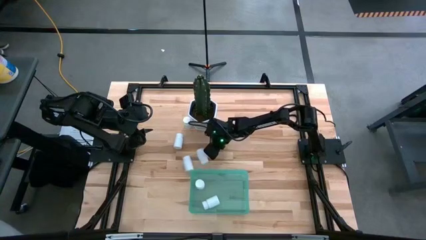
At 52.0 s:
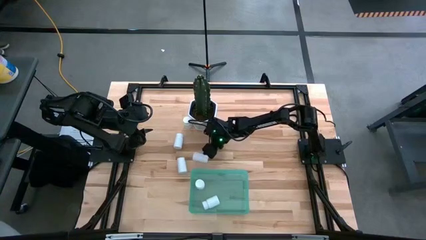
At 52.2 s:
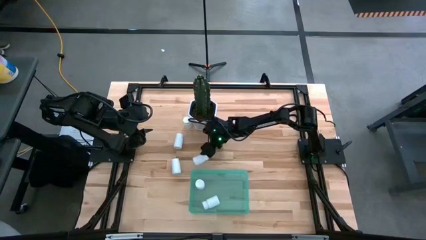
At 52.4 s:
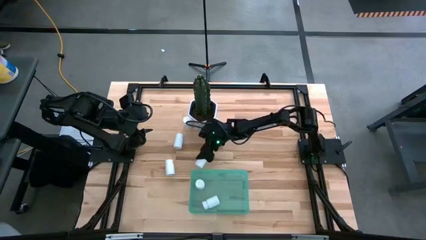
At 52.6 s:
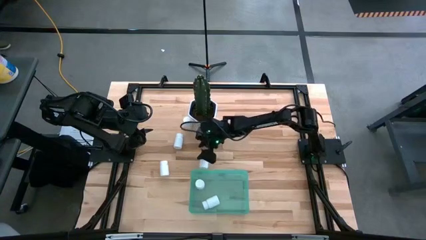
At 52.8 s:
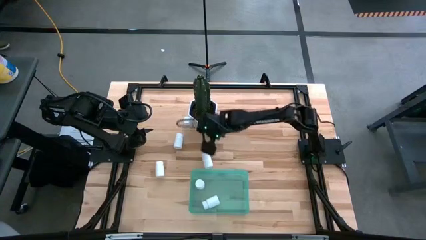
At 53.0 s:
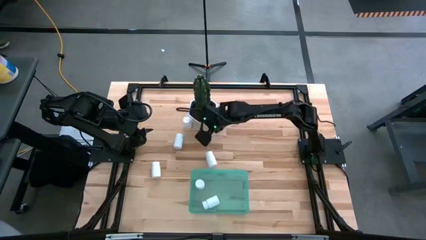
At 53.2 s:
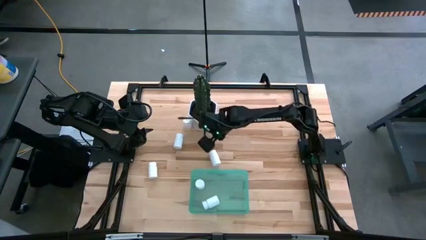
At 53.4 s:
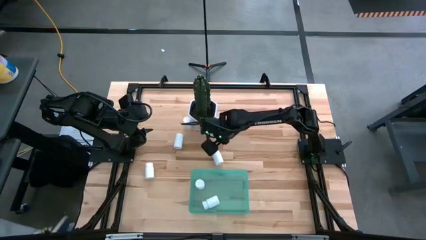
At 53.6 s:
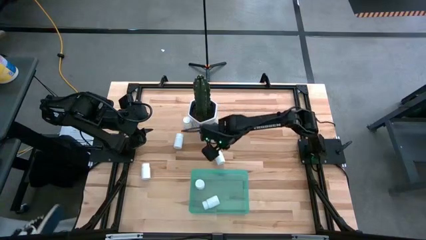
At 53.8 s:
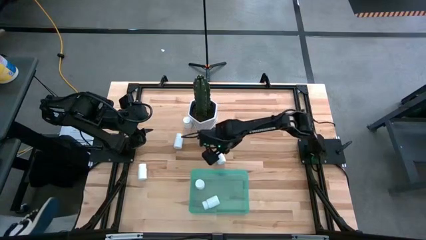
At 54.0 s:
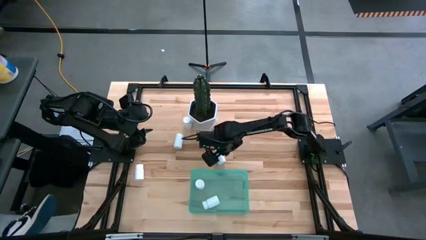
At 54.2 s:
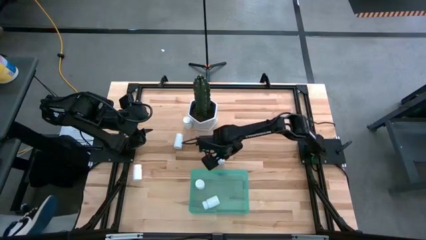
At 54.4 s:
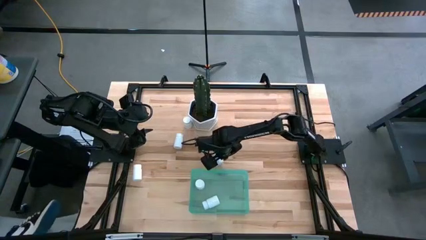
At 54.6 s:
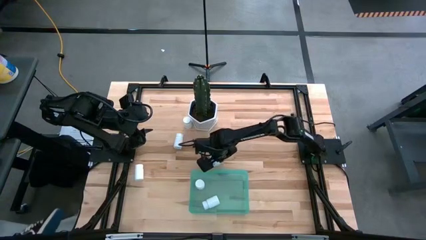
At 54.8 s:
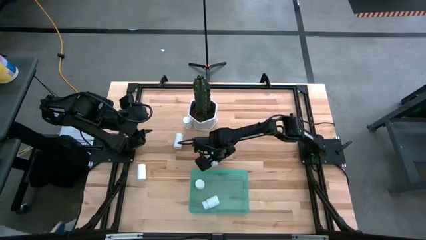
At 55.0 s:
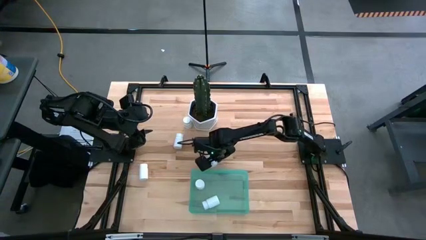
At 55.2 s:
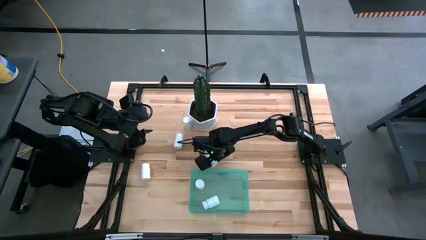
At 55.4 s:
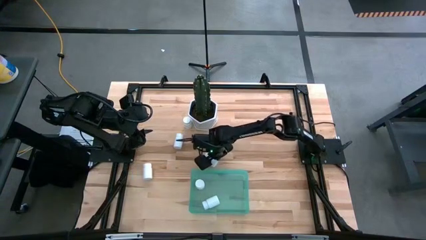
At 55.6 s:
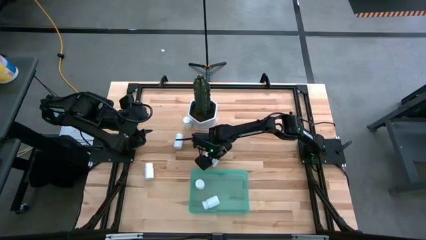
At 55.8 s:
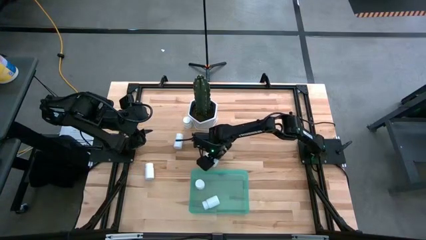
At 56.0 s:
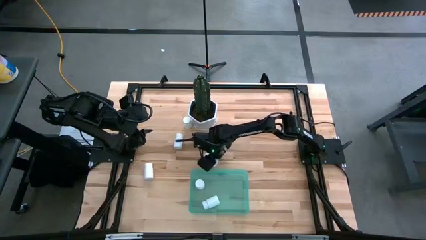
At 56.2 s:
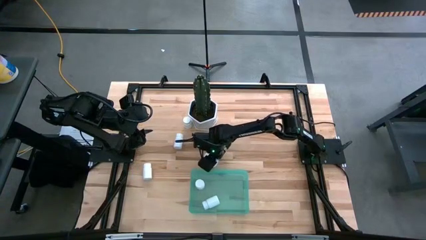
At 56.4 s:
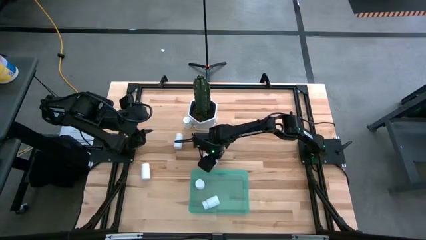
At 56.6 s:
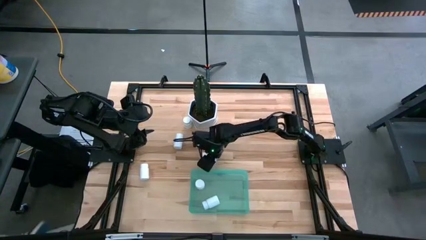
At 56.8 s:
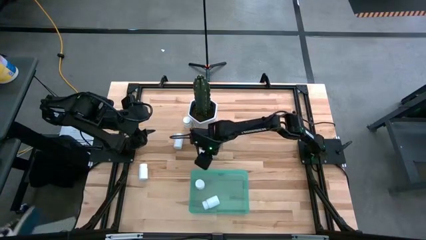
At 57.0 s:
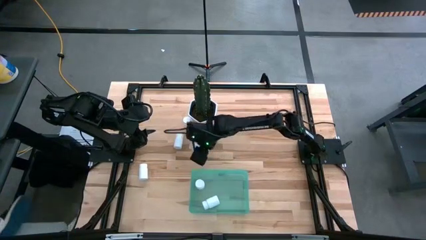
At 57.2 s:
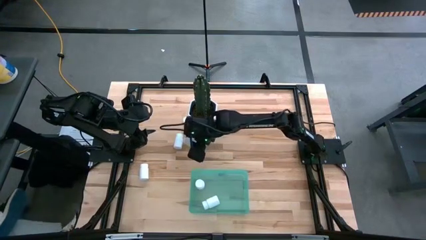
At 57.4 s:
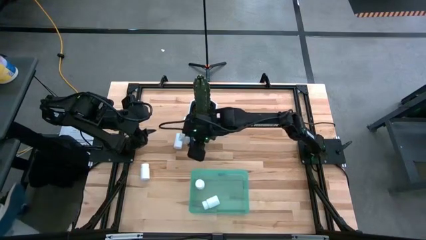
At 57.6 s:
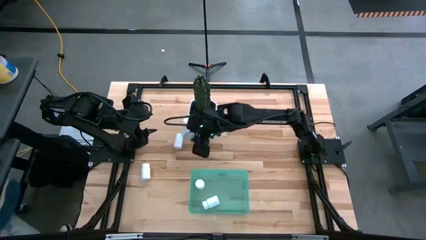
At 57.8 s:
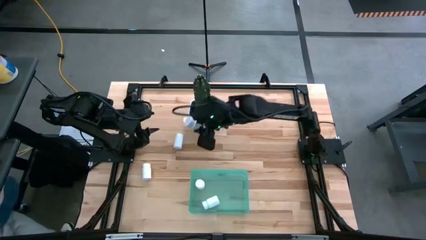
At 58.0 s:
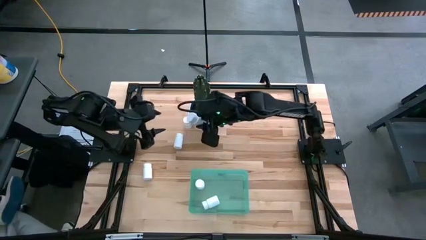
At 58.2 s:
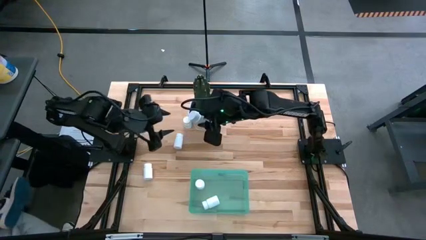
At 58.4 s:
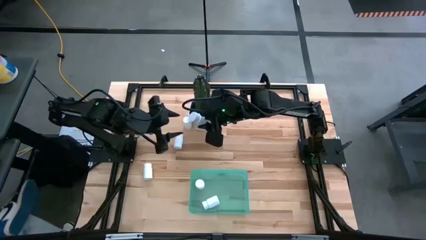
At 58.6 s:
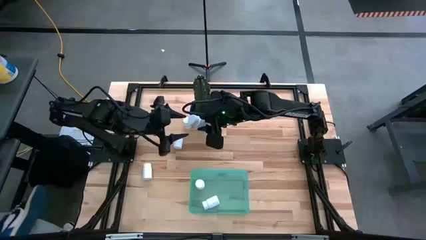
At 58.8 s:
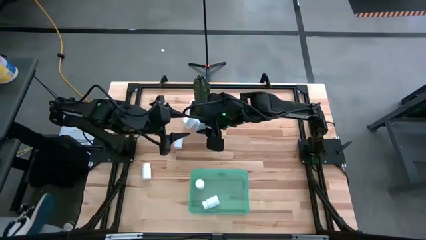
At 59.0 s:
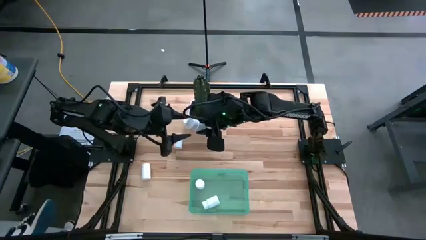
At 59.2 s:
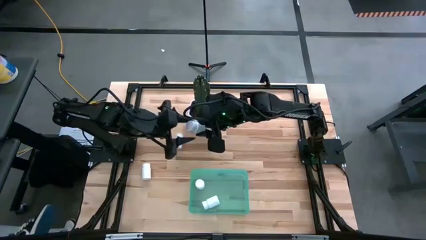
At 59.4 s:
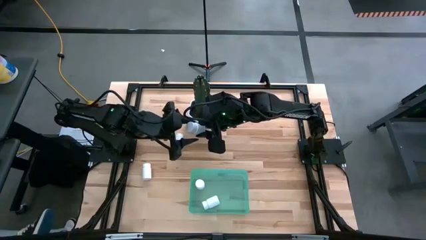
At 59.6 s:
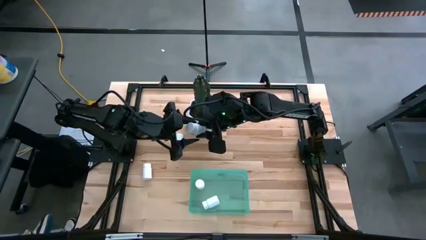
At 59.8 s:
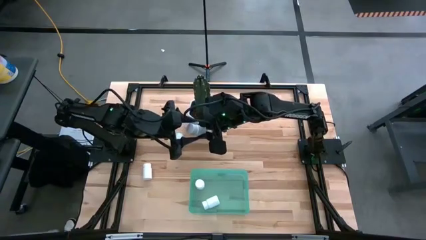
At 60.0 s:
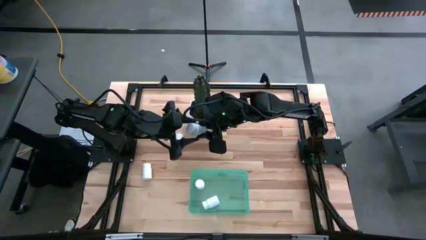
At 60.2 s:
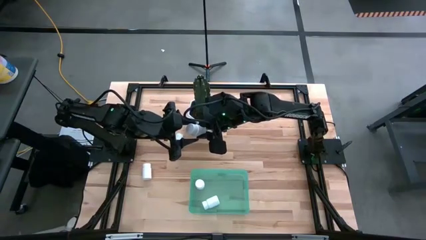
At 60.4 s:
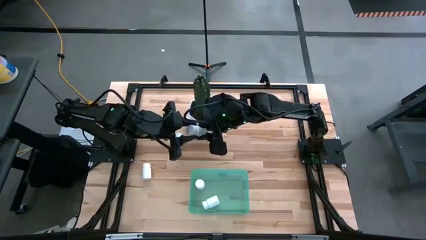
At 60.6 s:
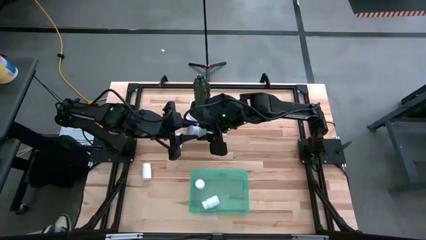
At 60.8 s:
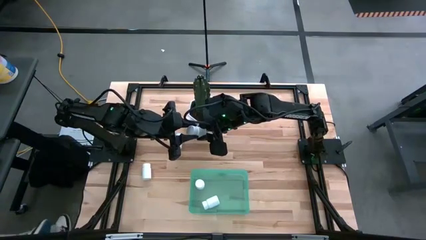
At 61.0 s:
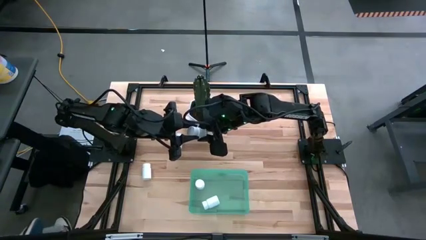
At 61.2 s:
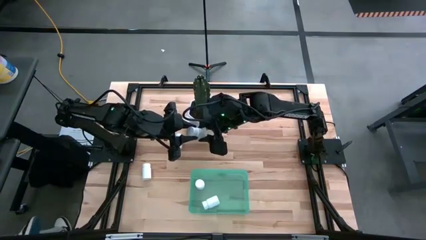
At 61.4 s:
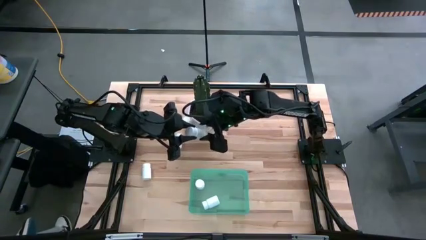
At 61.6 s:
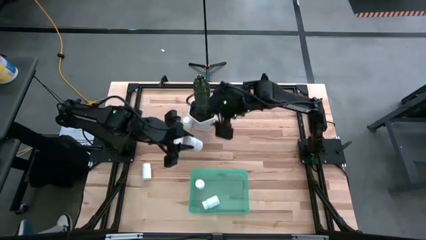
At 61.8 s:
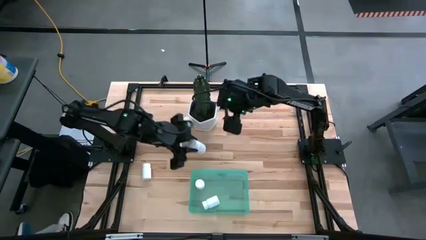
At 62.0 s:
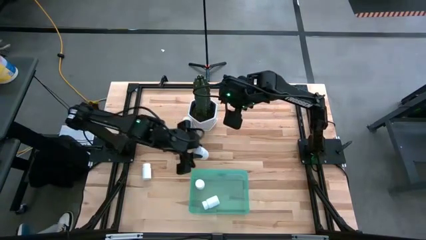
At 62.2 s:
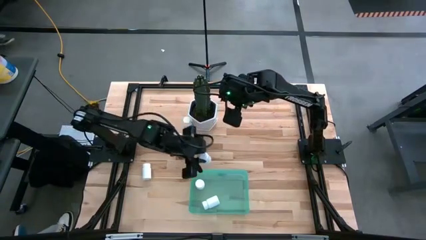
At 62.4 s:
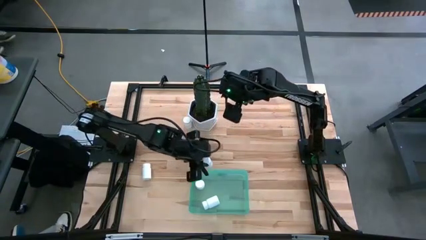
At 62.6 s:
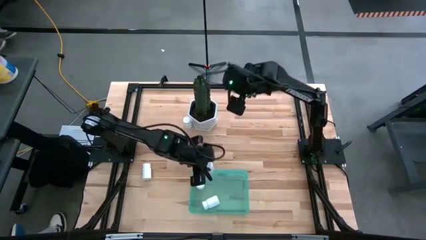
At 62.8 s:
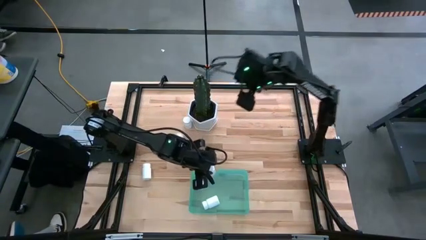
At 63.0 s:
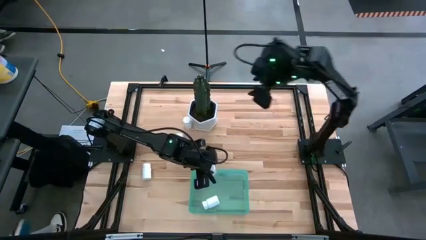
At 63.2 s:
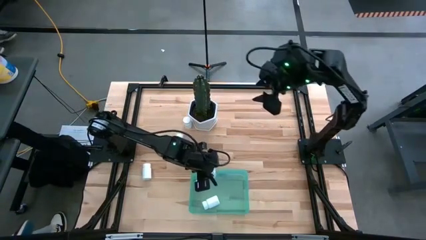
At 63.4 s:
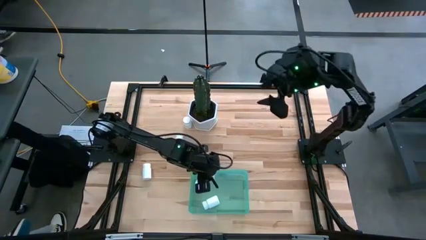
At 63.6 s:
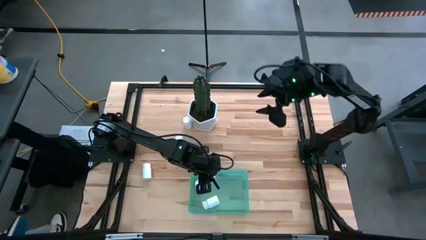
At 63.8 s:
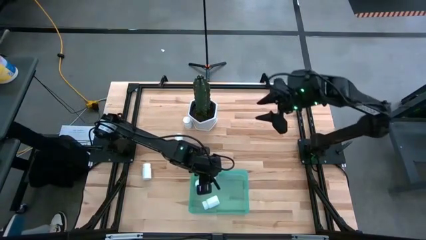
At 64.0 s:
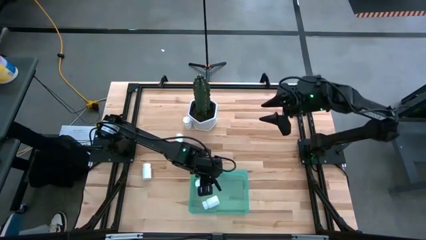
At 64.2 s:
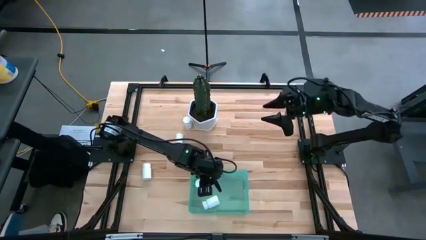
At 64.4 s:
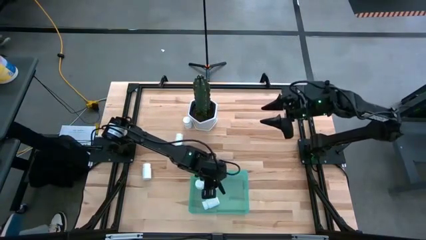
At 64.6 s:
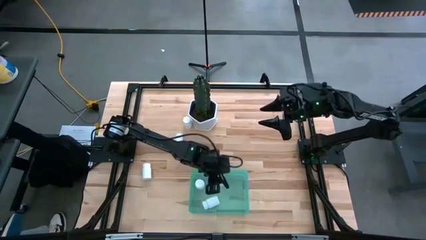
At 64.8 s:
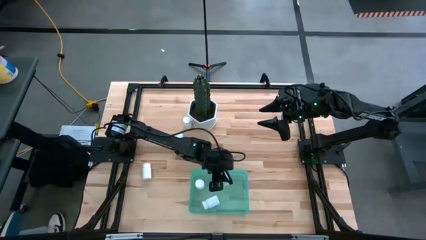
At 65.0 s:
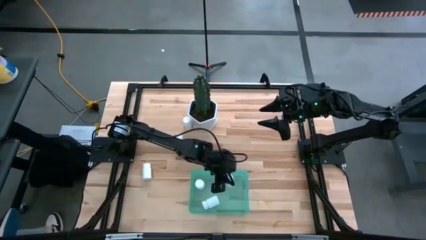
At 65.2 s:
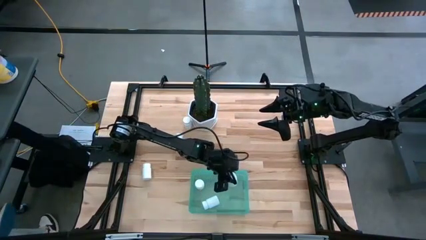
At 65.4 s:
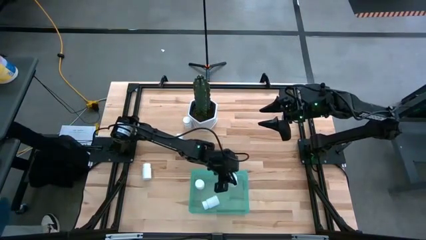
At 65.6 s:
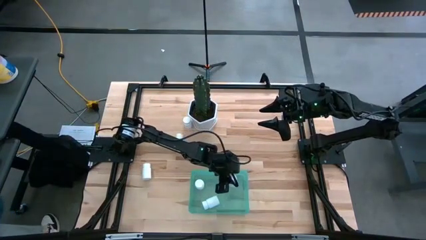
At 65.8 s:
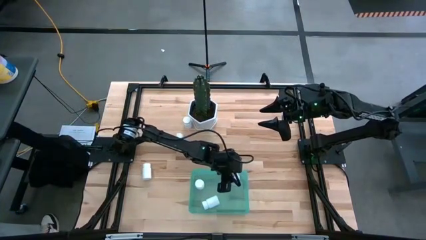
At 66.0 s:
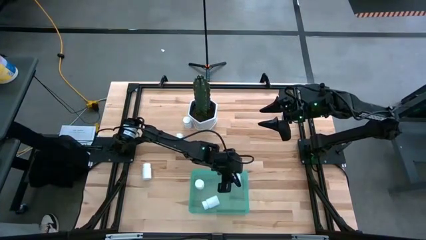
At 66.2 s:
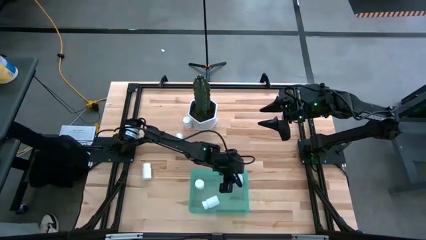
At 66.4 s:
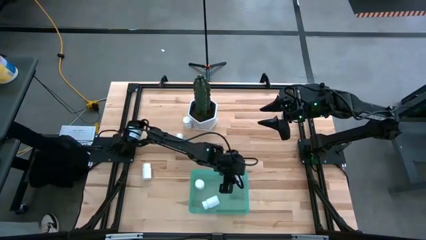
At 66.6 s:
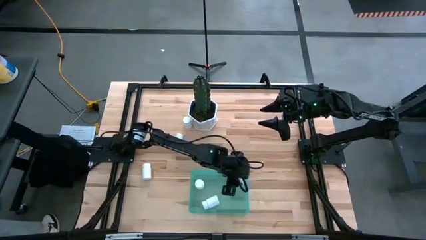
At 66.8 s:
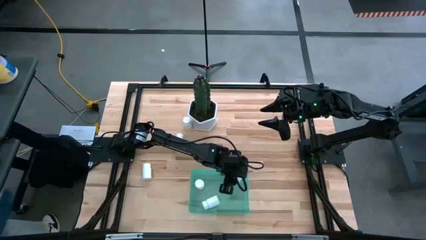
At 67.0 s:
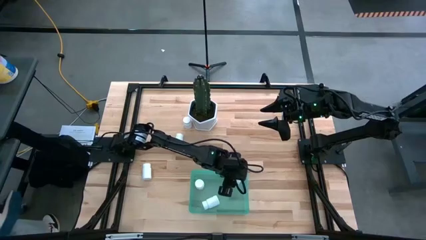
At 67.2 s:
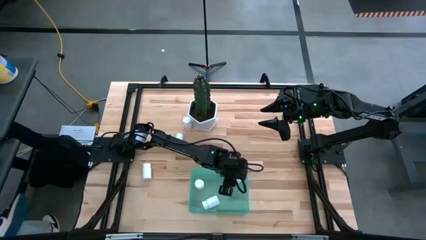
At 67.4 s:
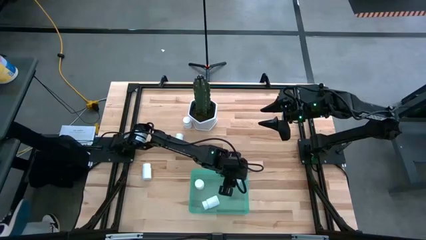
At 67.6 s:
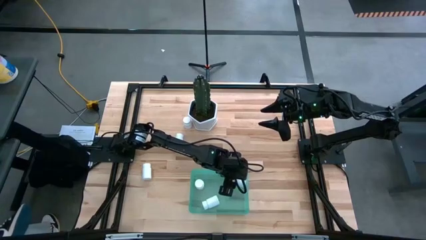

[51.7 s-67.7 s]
Task: Pick and place pill bottles into a basket
Put the white pill bottle into the green bin
